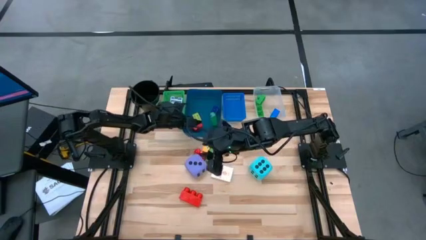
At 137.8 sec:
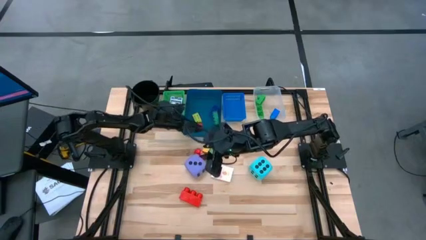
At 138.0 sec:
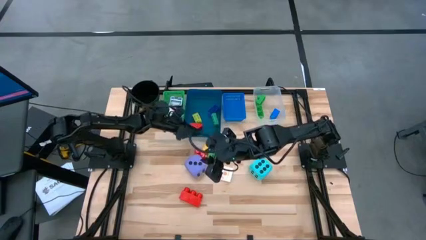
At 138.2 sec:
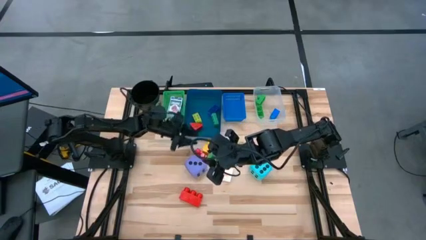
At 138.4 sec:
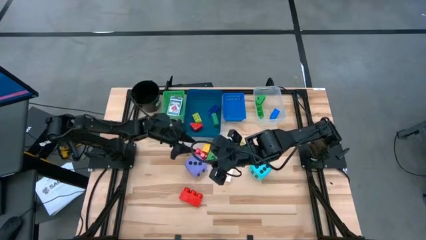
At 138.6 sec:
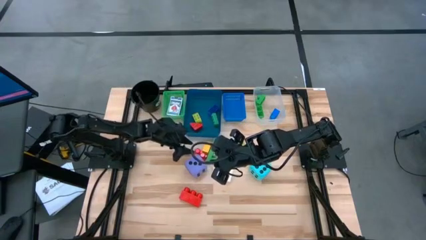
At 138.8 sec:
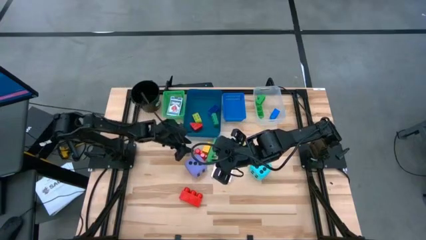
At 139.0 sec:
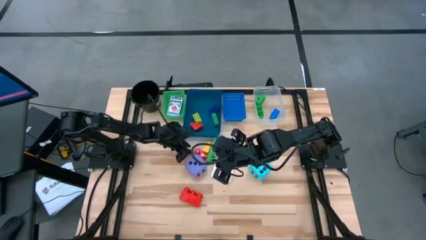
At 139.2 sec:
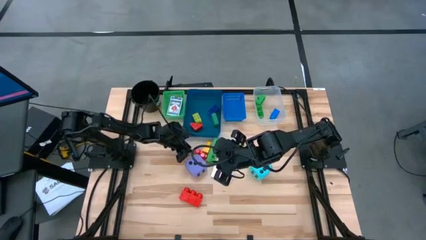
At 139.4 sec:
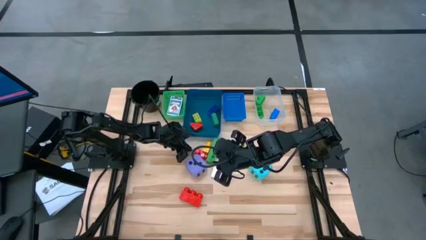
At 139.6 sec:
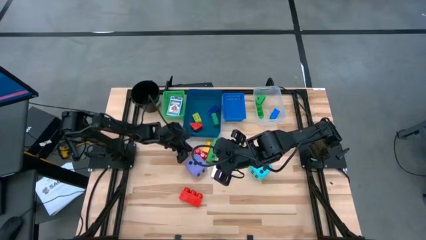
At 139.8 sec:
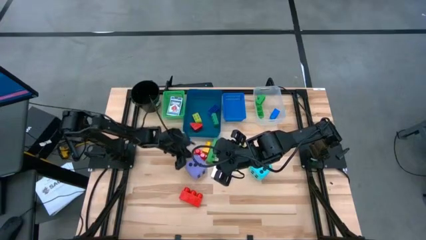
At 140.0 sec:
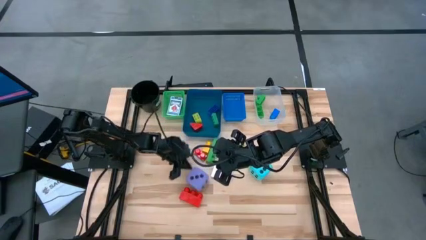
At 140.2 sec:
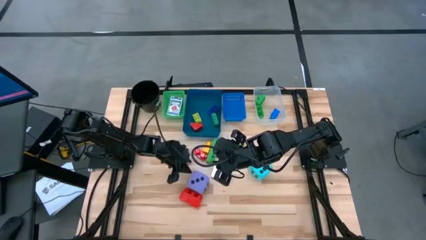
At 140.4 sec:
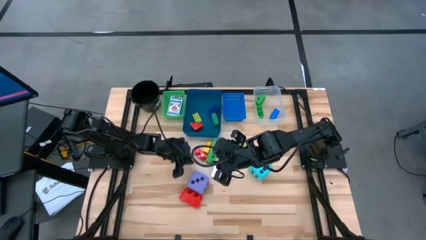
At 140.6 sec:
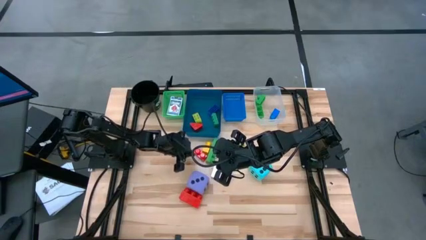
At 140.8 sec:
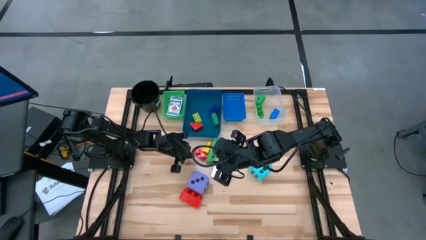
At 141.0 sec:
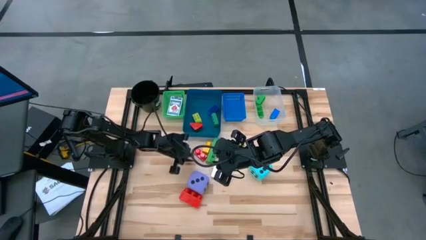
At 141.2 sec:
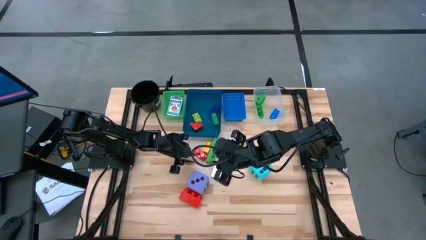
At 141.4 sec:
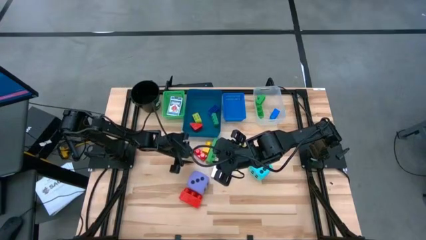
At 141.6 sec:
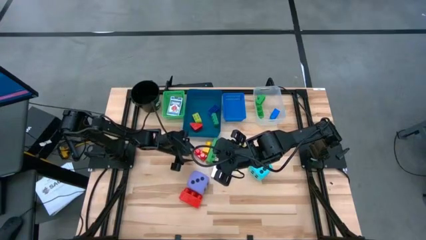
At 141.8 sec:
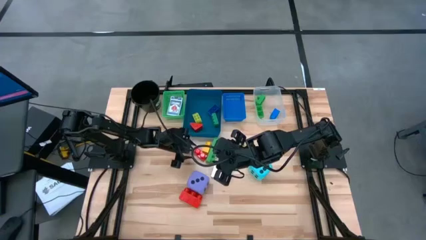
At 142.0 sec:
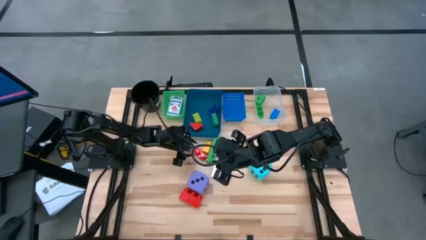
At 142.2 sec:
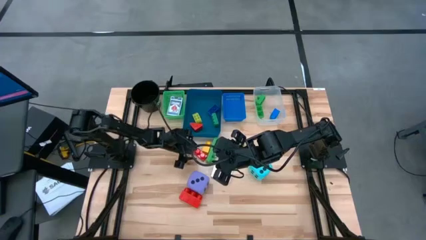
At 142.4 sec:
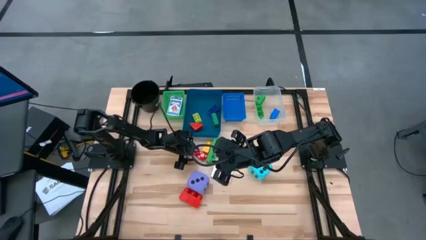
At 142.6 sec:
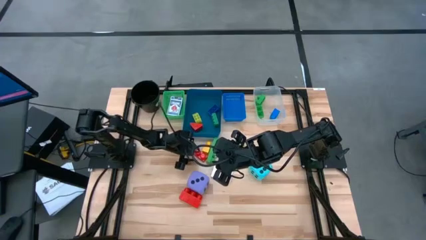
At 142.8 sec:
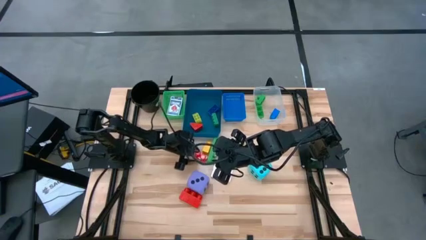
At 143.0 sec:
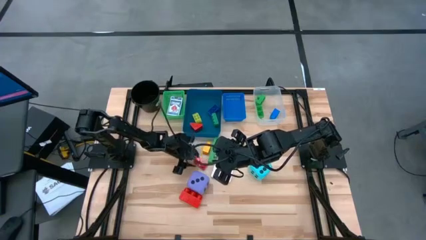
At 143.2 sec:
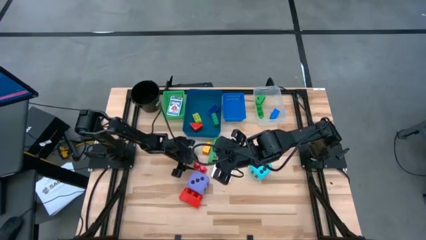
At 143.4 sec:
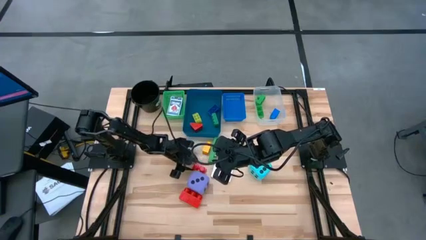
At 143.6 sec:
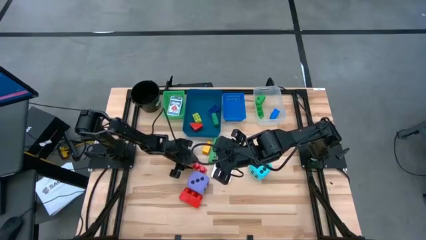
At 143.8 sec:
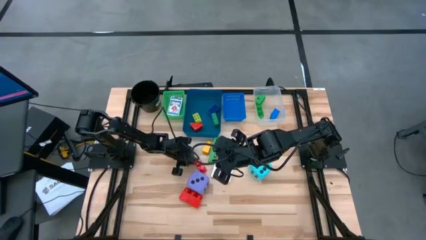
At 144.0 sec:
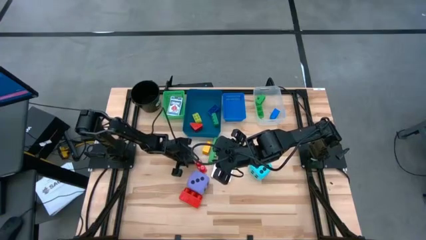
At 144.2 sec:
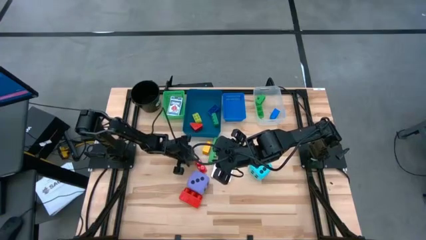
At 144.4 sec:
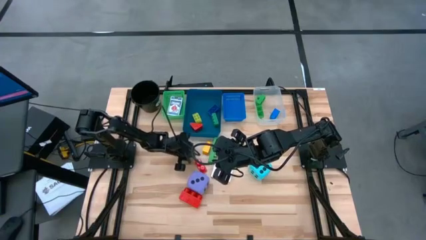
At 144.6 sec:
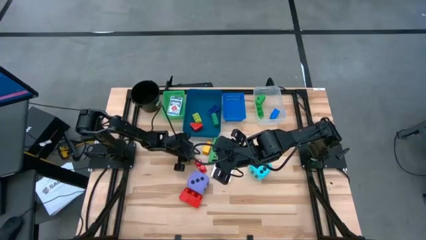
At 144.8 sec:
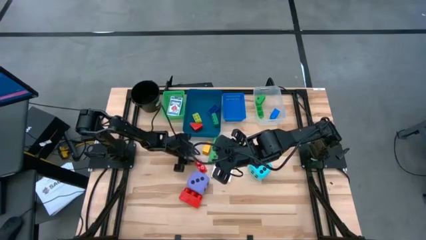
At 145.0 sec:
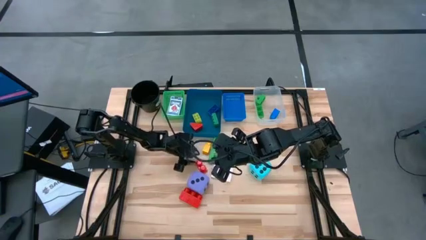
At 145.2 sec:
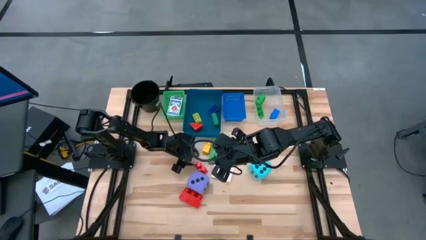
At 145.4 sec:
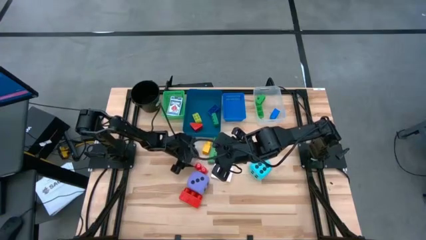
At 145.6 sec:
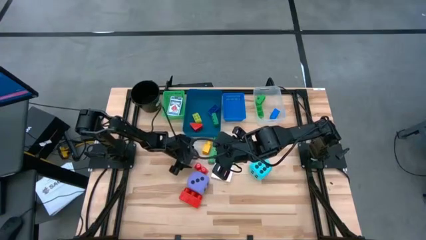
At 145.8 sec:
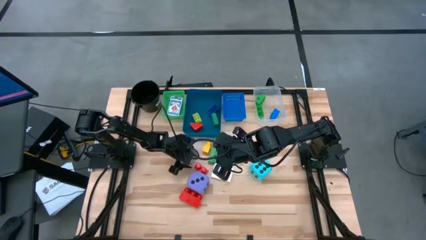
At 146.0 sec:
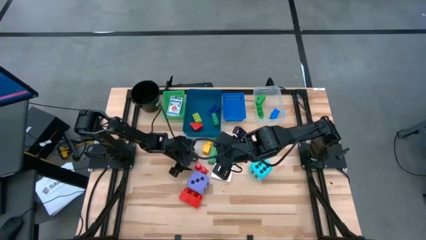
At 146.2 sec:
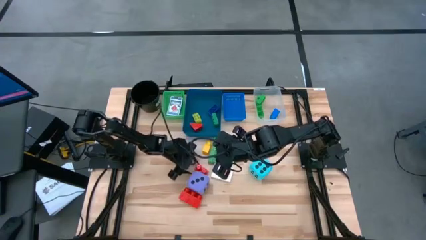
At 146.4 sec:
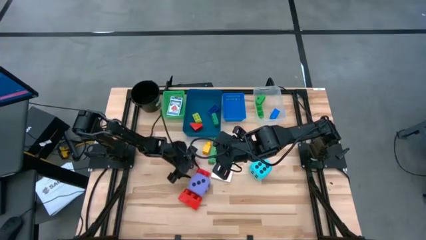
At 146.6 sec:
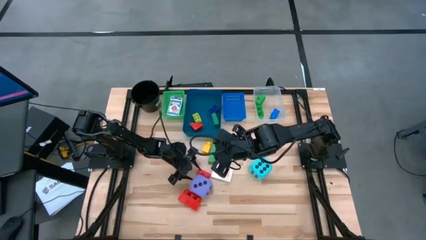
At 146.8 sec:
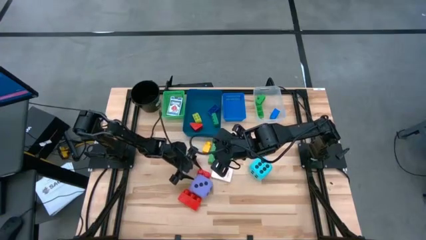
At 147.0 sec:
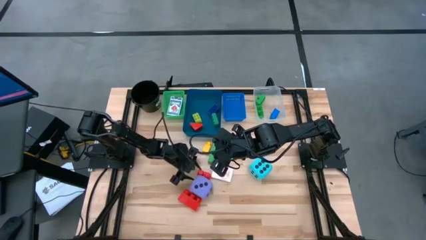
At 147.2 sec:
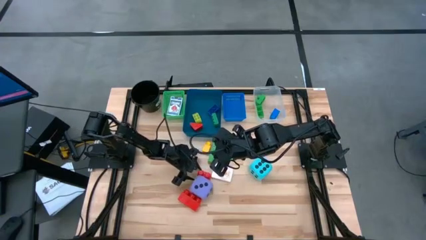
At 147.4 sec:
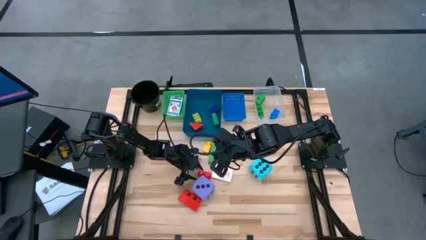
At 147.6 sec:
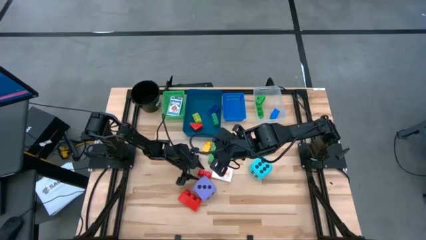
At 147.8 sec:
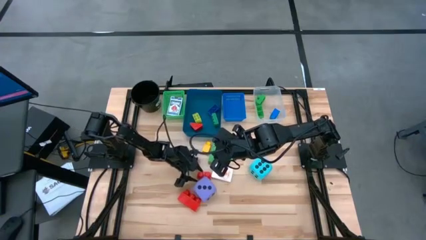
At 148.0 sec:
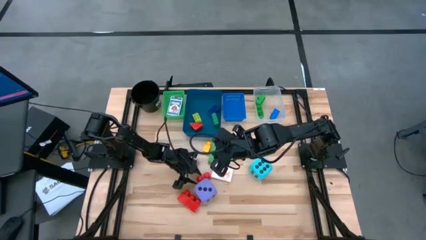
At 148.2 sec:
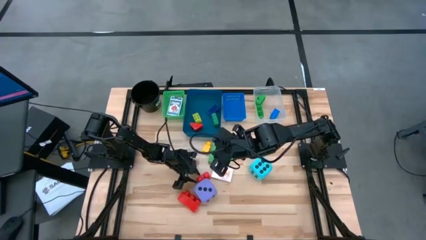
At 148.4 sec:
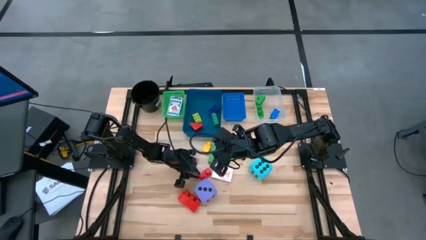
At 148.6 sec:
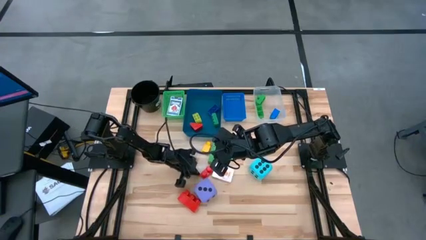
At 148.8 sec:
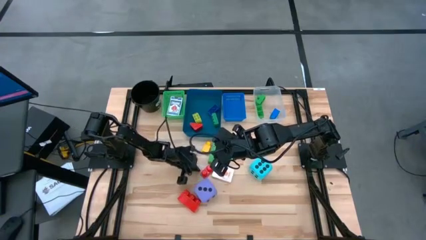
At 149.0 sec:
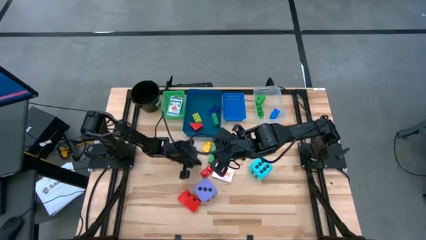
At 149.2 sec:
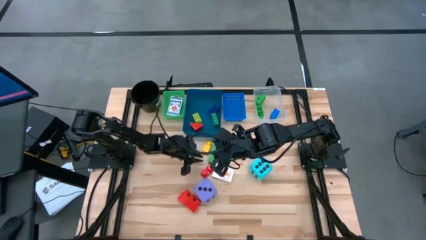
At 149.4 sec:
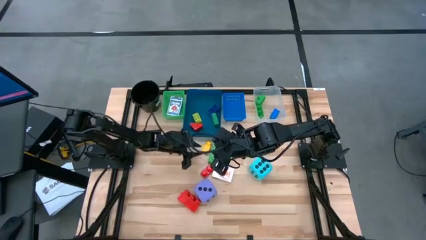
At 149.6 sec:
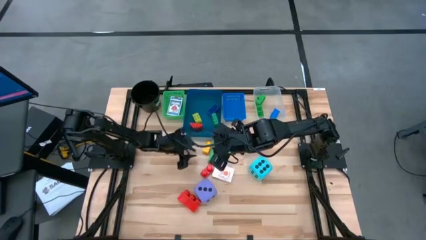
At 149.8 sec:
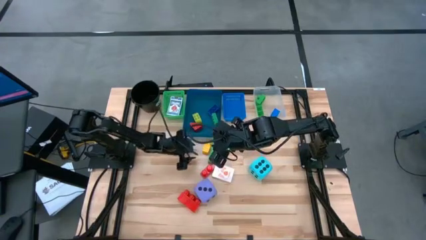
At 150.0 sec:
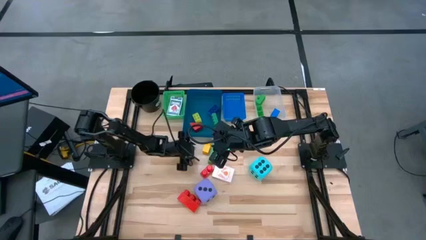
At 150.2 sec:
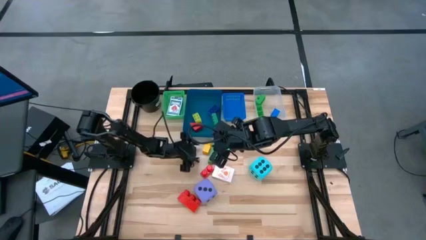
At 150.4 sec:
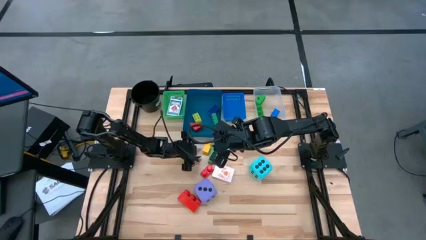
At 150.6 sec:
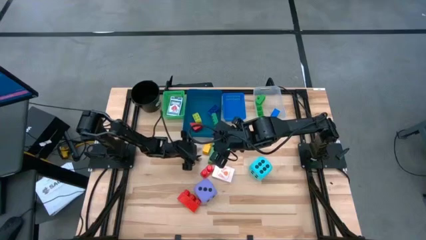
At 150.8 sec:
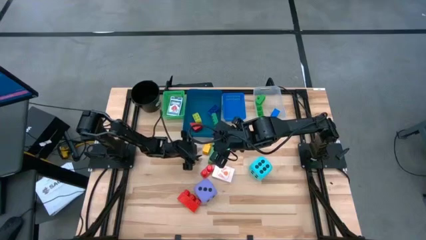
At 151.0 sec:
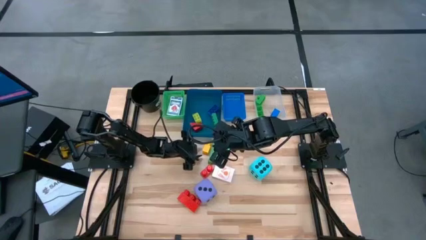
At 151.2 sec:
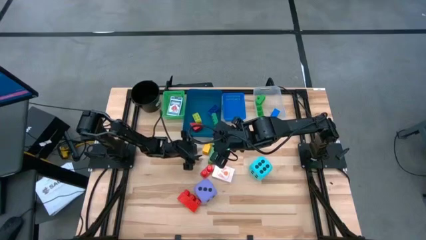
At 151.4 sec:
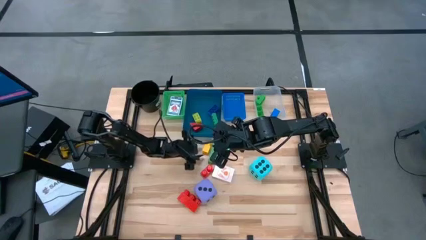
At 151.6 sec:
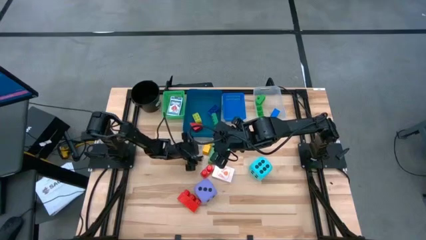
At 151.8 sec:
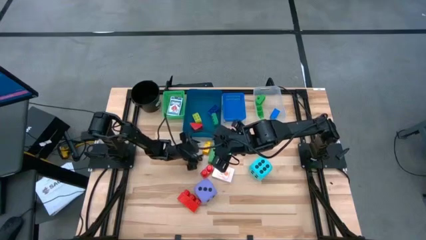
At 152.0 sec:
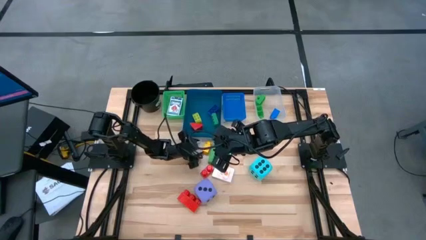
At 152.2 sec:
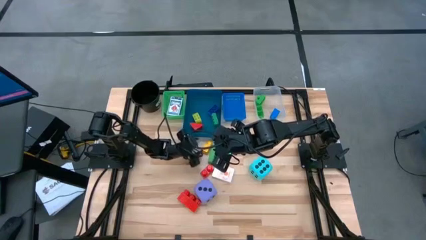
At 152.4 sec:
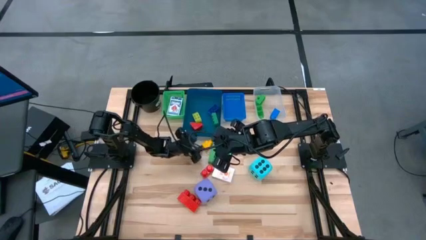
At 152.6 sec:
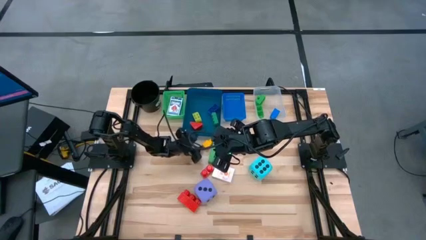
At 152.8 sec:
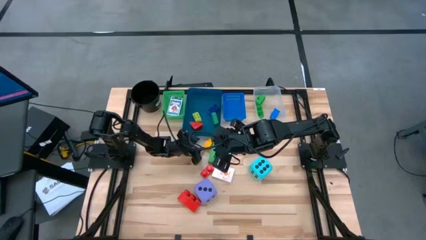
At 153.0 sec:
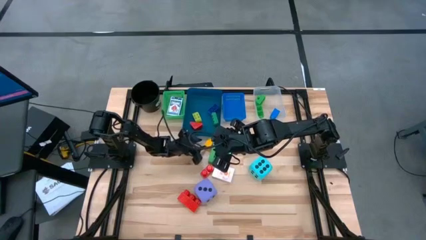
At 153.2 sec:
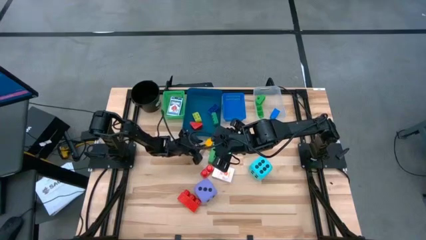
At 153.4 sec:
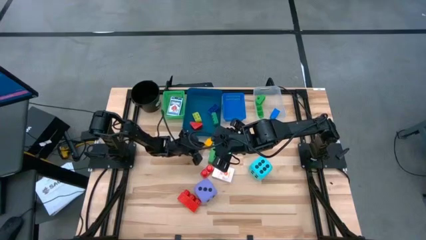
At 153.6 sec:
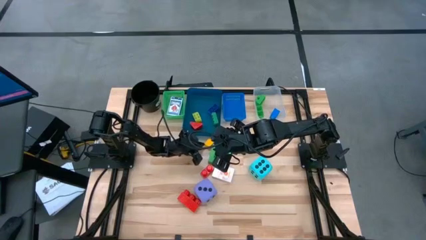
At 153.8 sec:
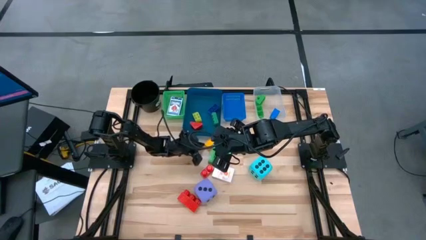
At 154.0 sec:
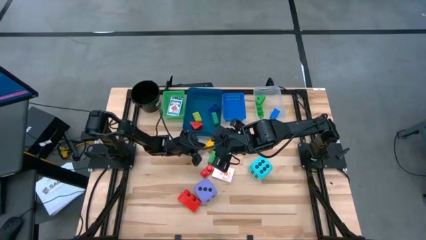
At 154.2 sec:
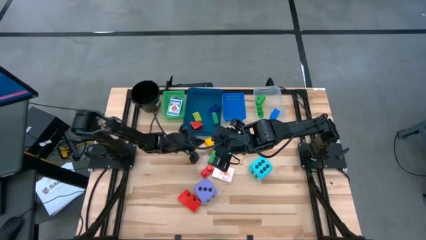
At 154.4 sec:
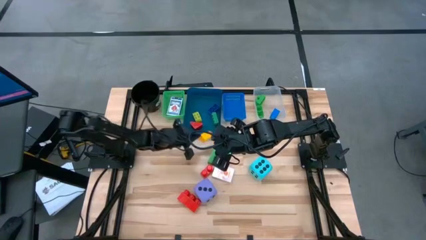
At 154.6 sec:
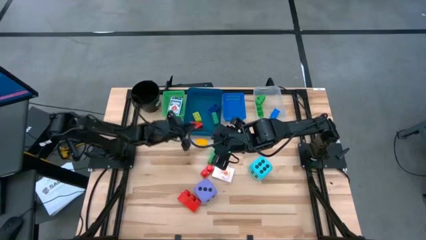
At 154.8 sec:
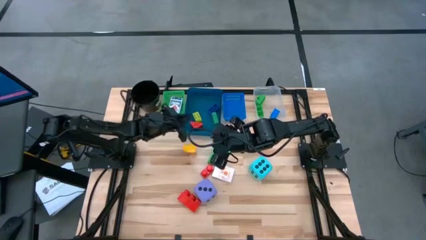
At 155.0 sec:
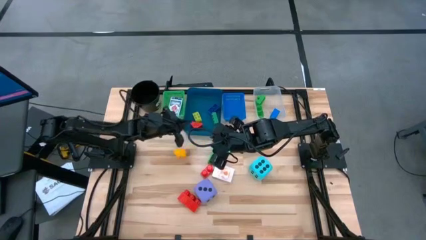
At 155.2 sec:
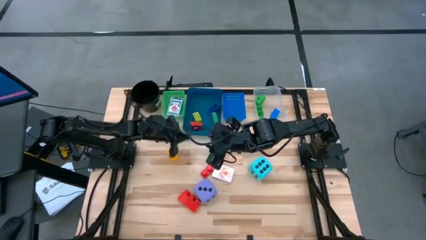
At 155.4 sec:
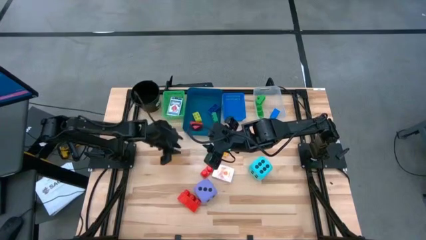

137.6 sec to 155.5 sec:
Task: Pick & Place Toys
Put the large yellow game piece into the transparent bin
